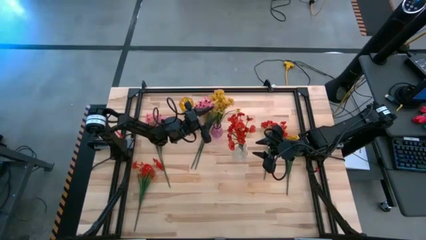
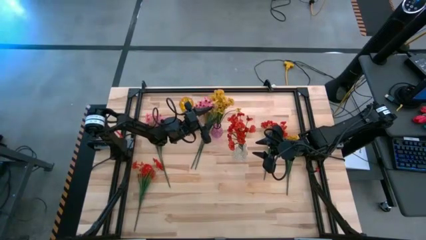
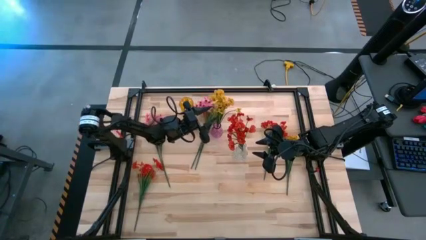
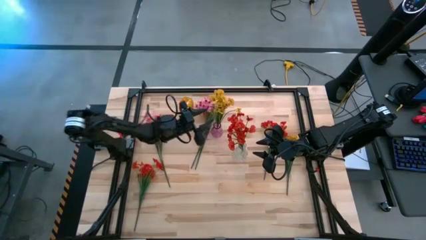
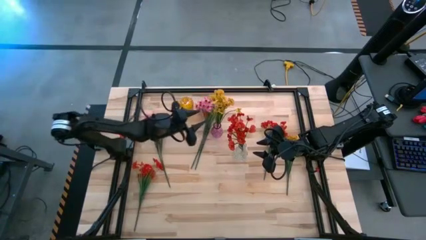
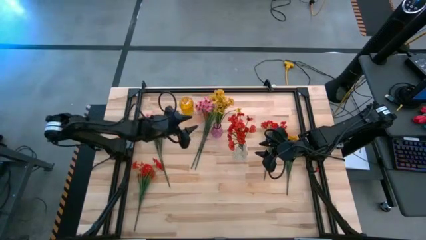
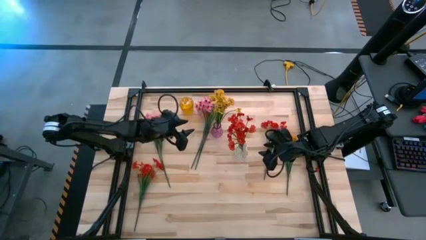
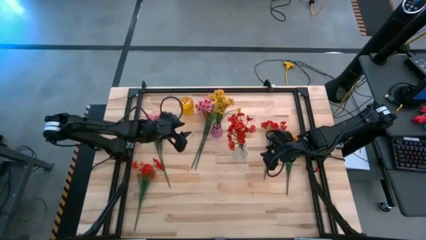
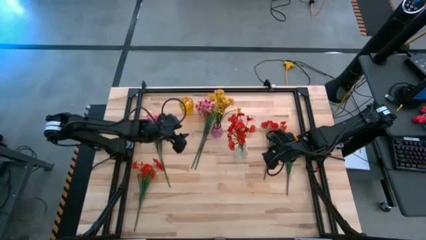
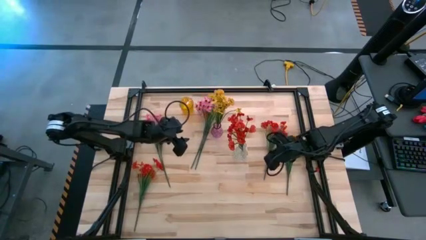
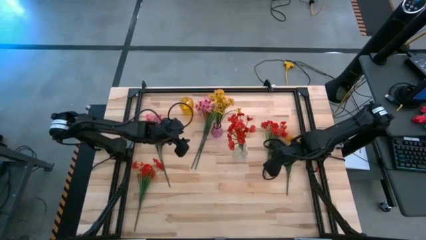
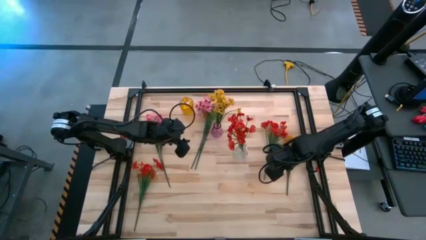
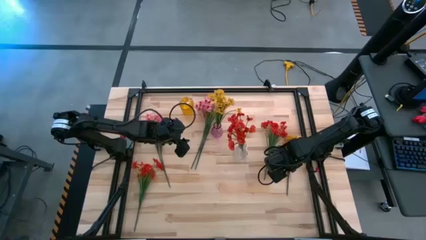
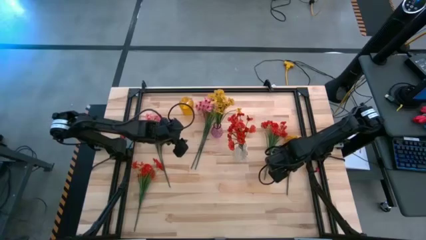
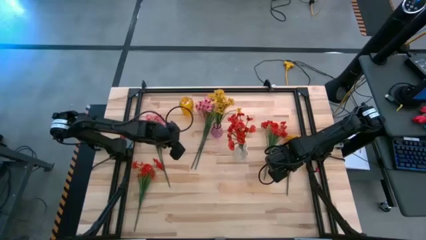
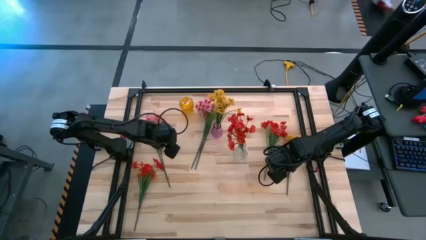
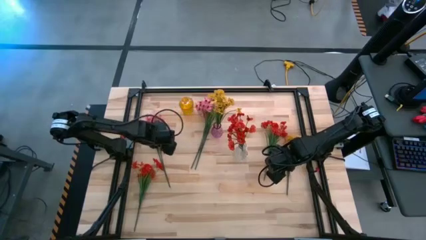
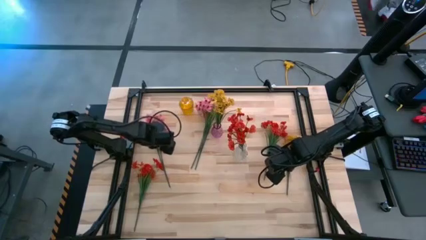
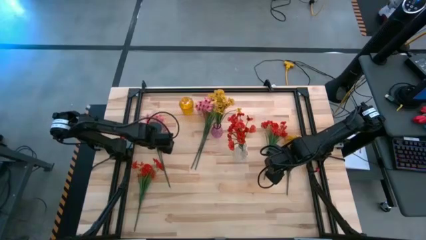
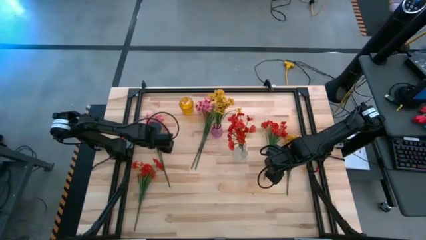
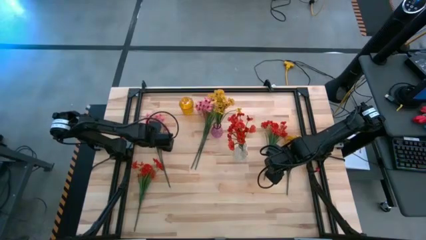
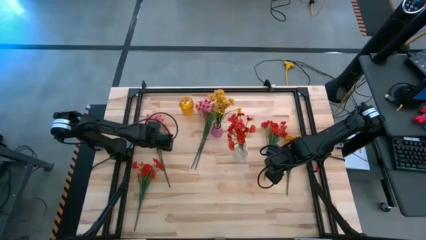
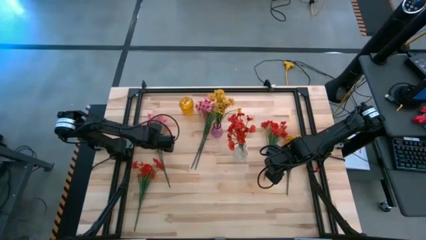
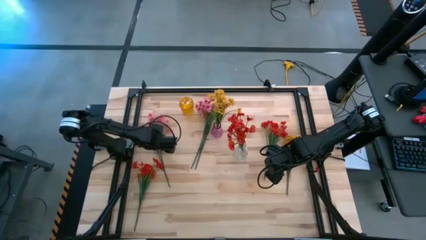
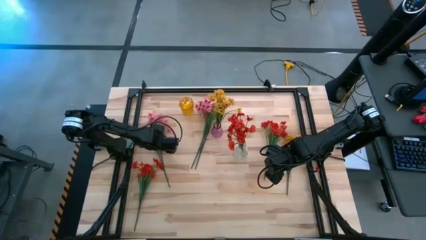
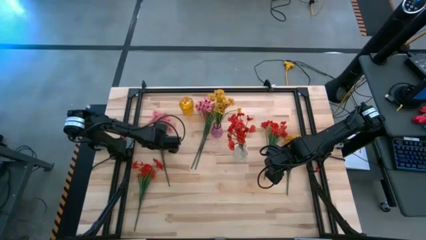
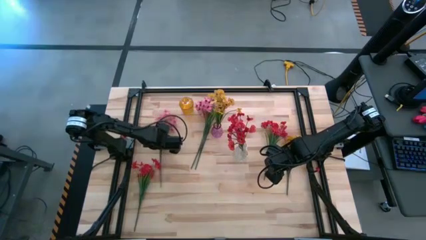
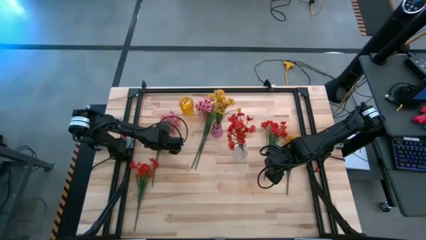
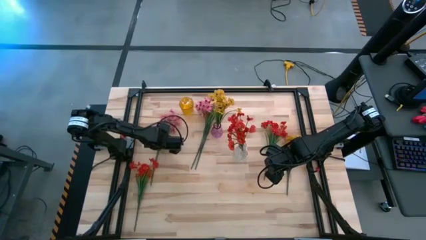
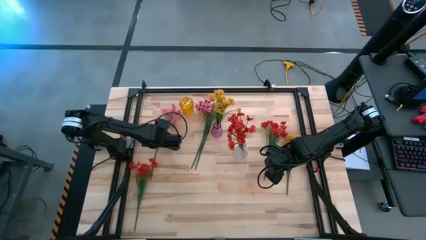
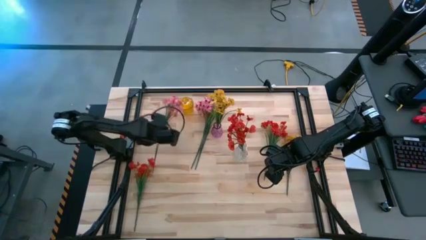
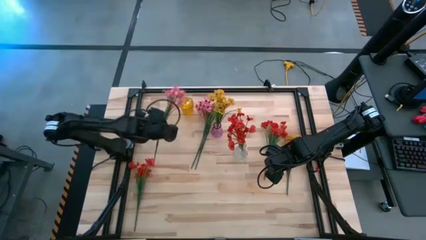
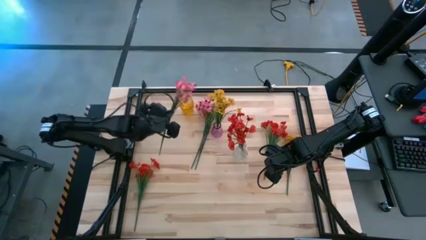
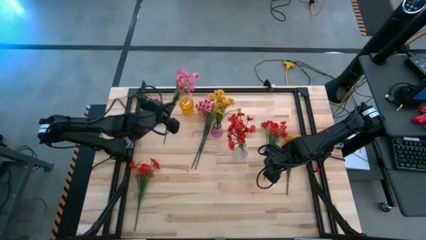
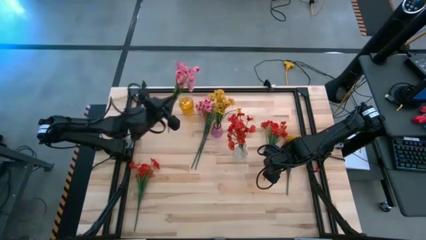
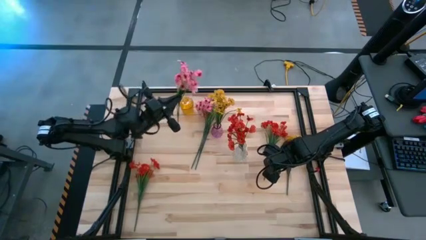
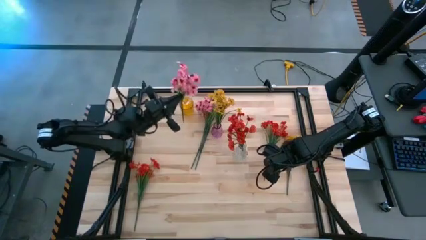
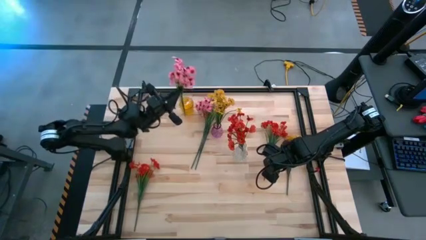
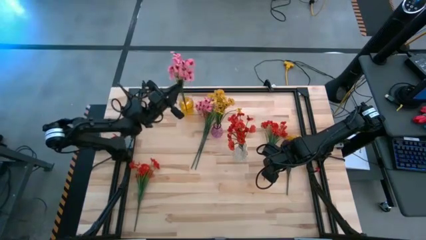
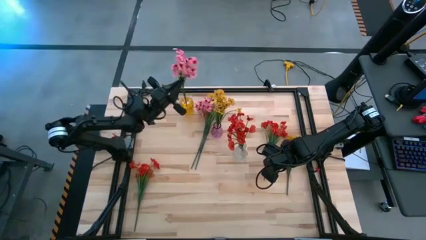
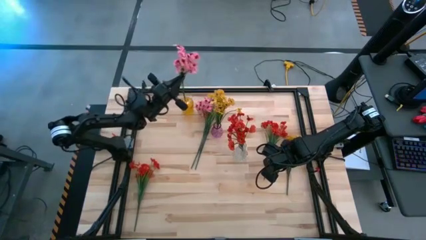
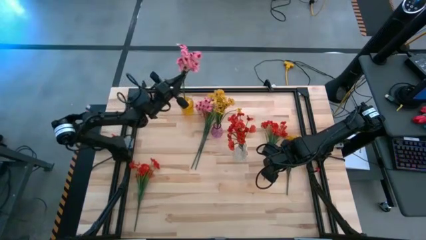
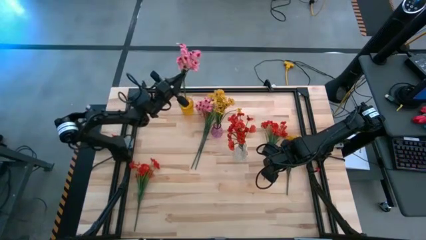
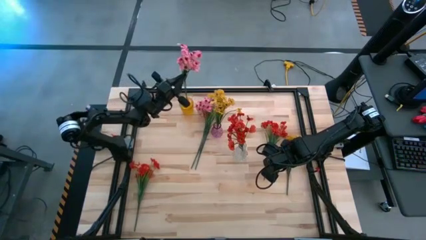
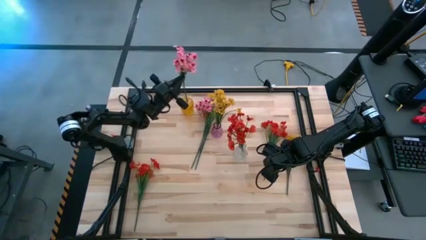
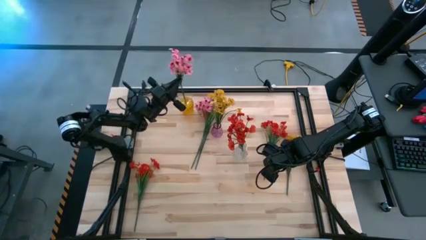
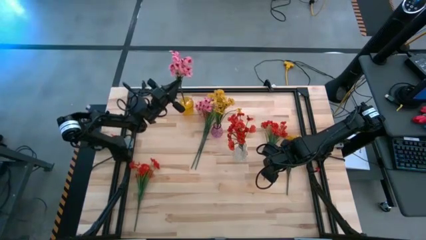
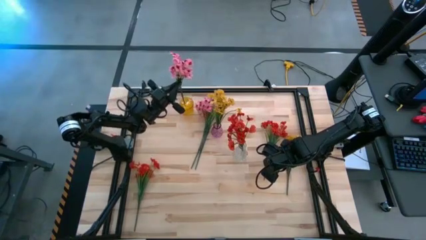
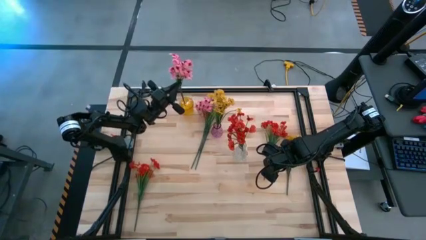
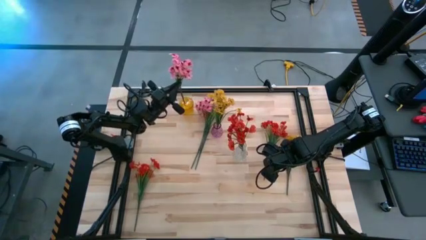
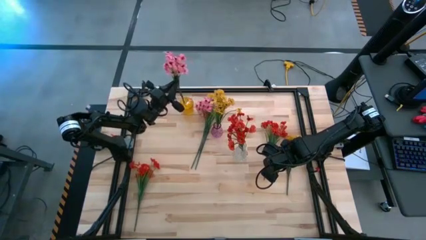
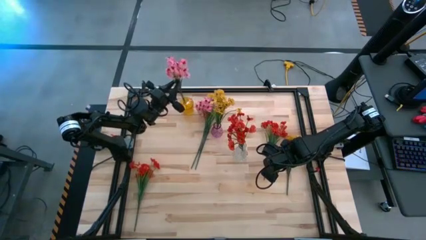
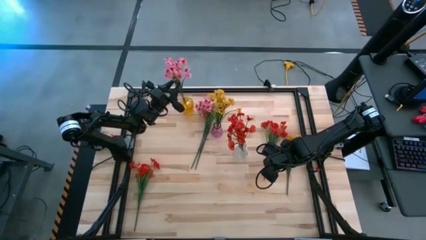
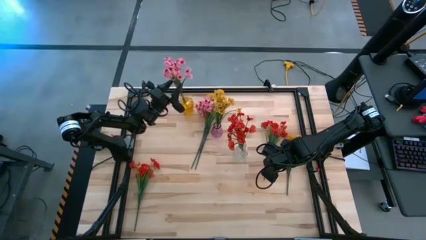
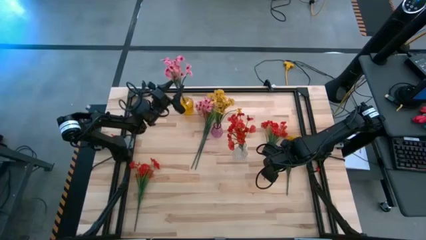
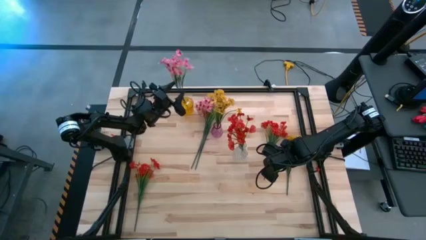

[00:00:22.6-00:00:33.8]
Task: Sort flowers into vase by color
Put the left pink flowers into the yellow vase

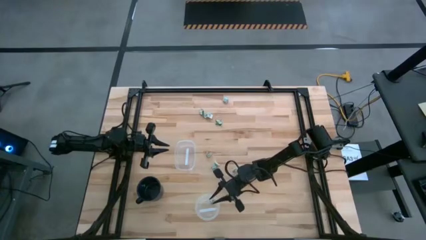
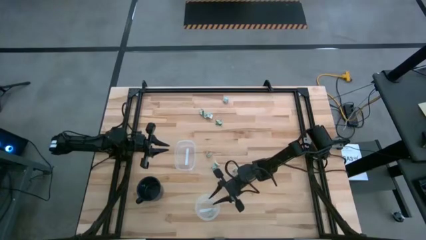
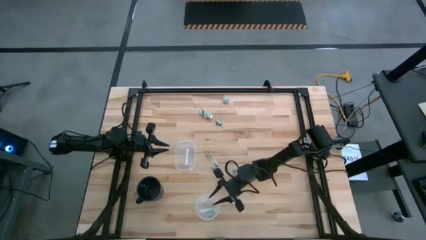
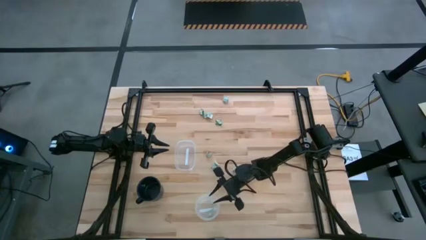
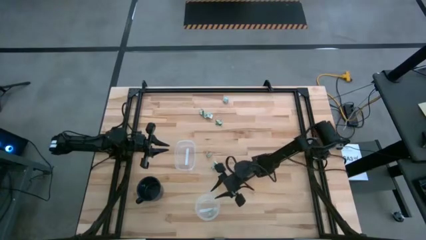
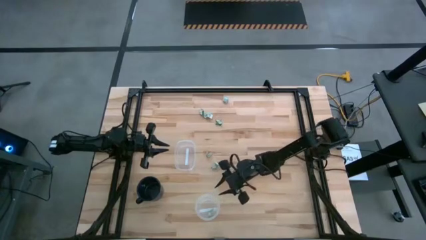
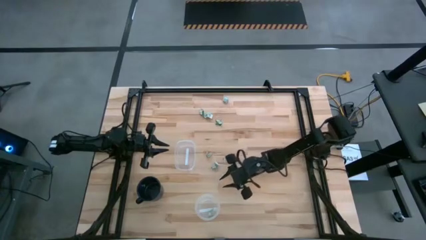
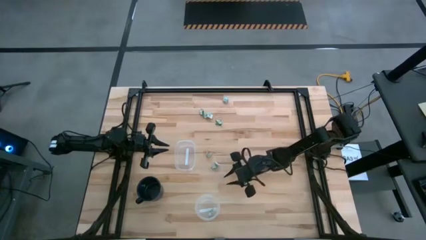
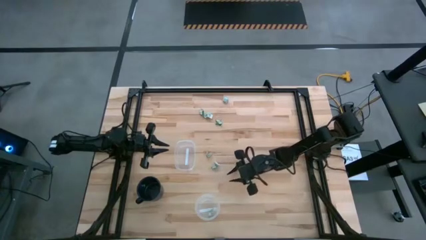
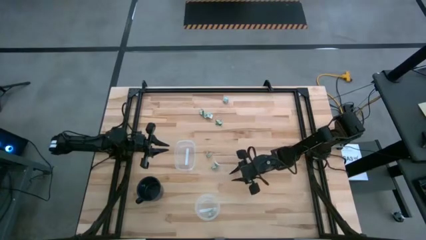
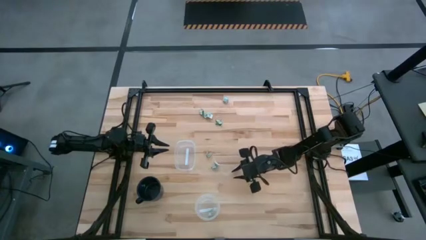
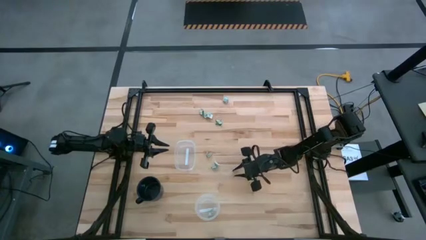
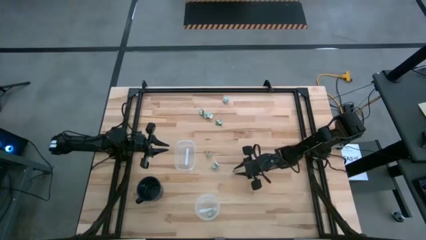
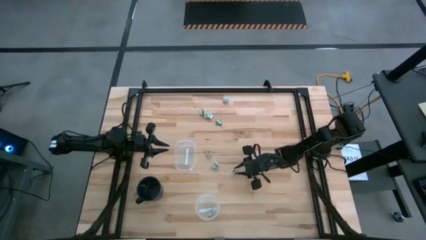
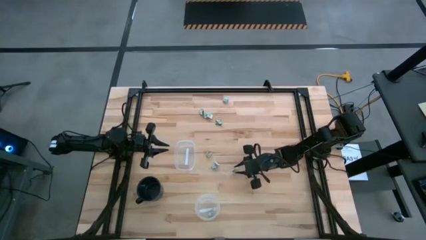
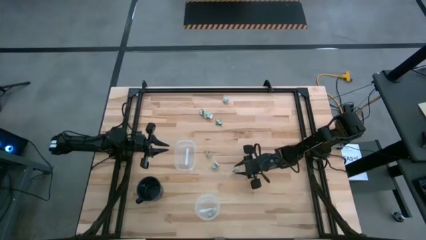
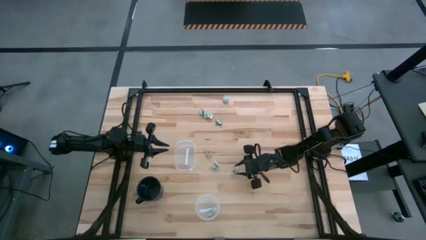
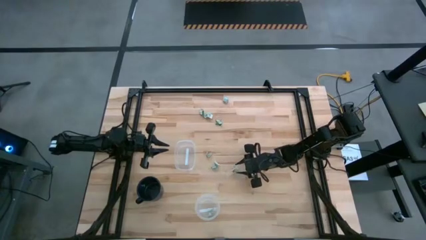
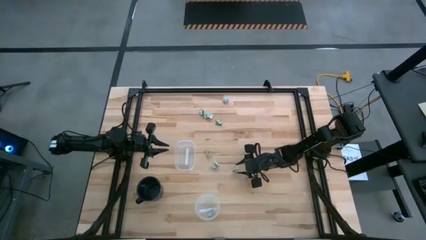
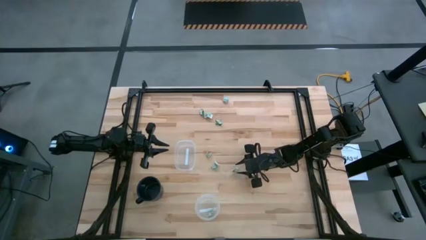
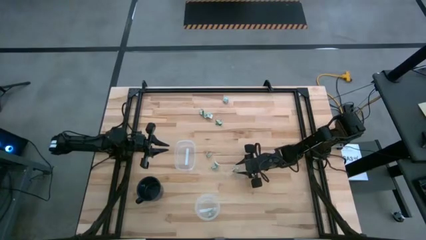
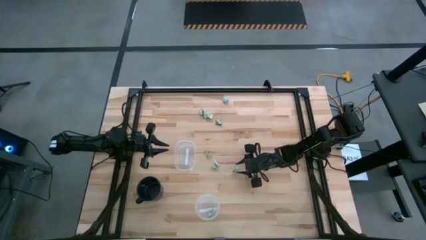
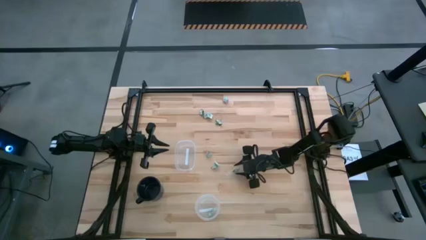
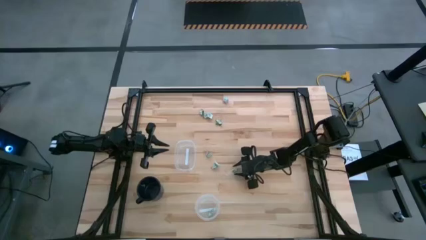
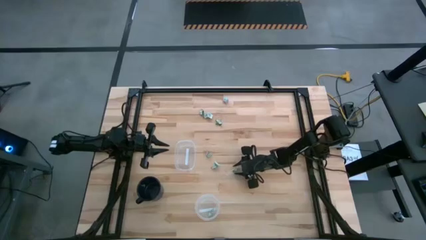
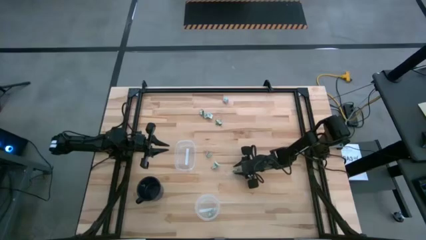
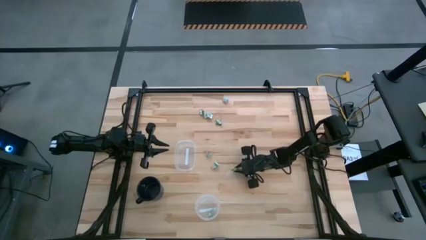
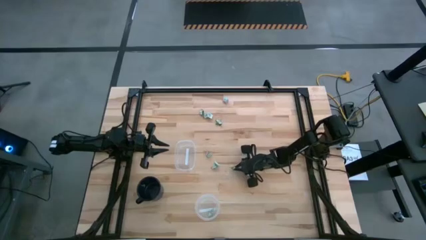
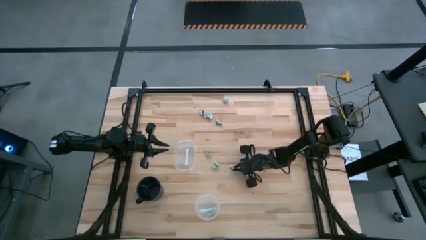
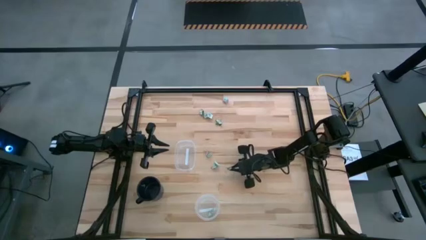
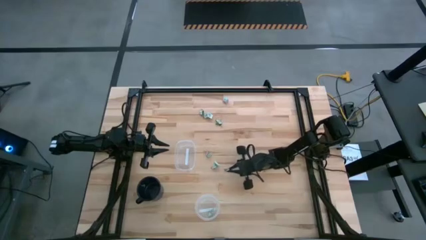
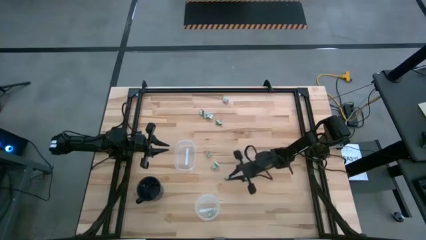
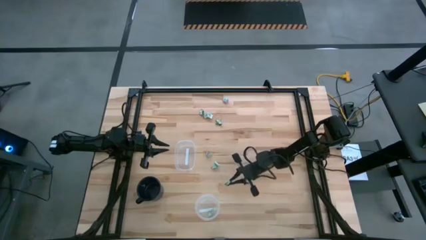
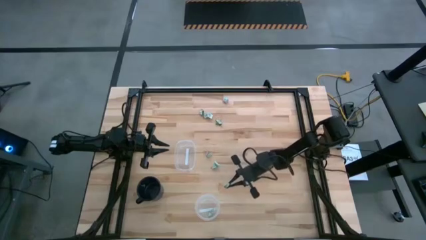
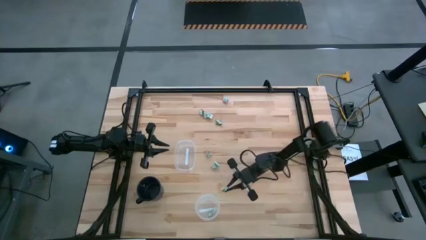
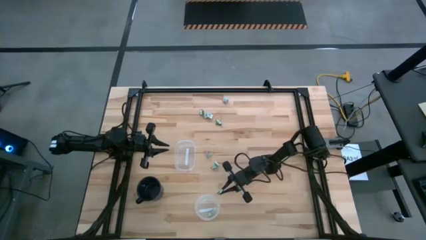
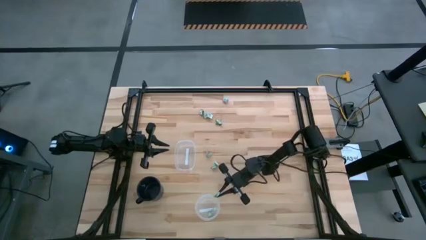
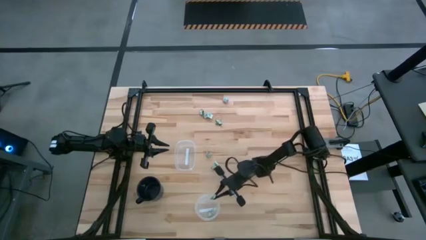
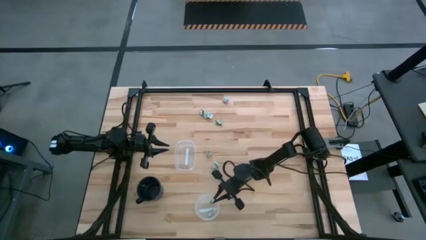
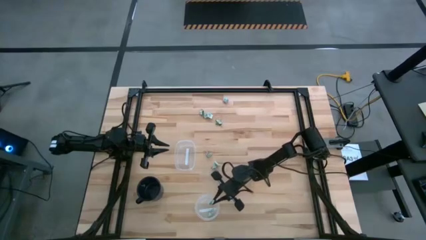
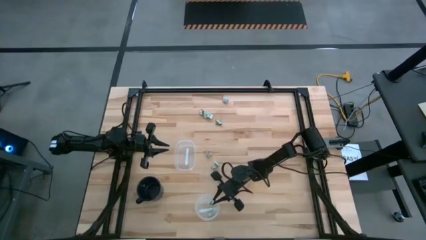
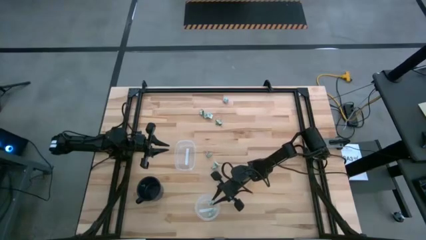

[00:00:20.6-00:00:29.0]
Task: Pick and place Stevia / Truvia into bins
Put the stevia packet into the round transparent container
